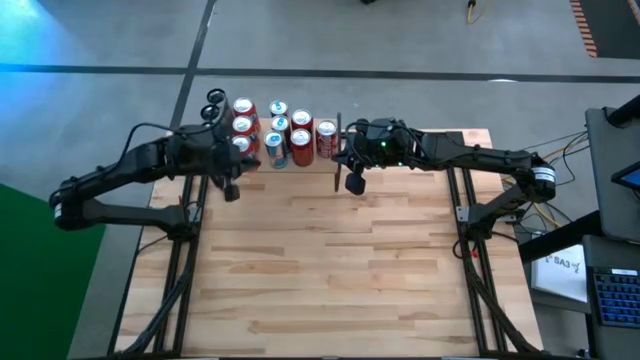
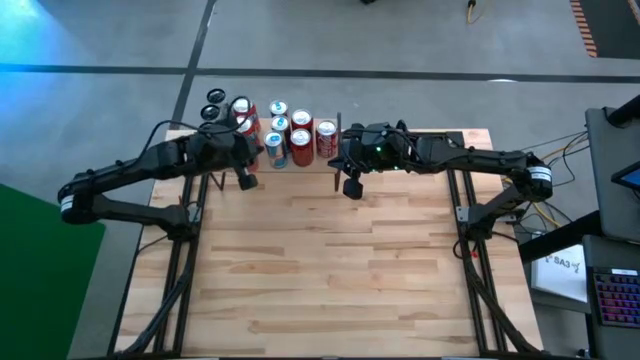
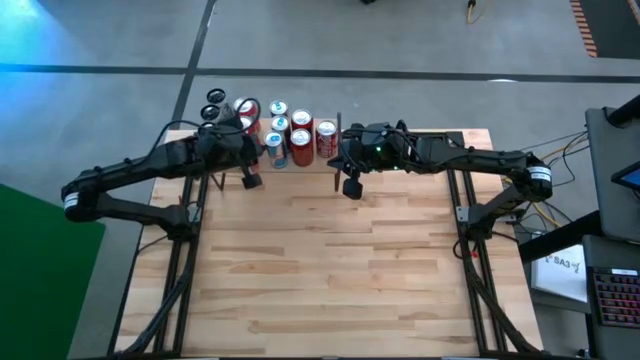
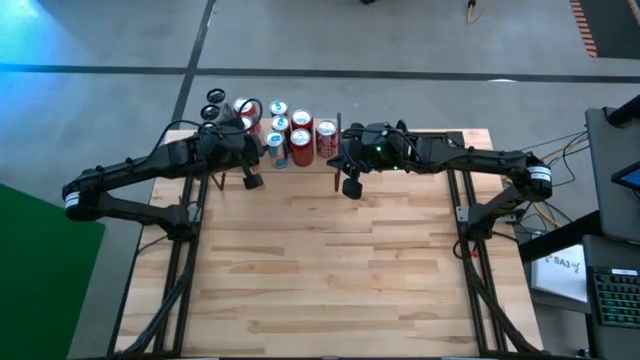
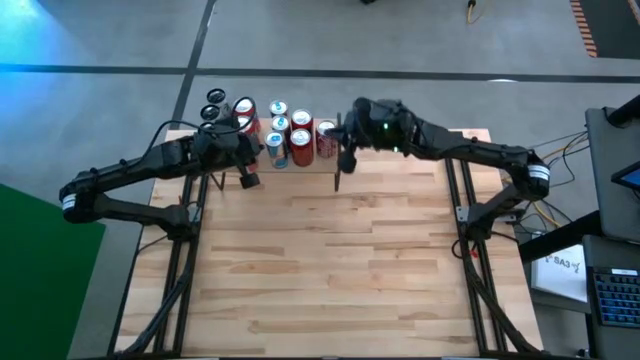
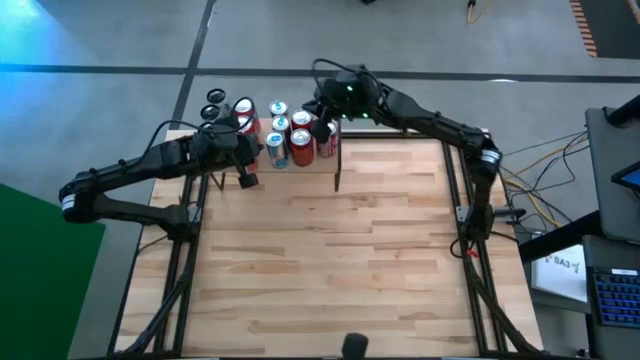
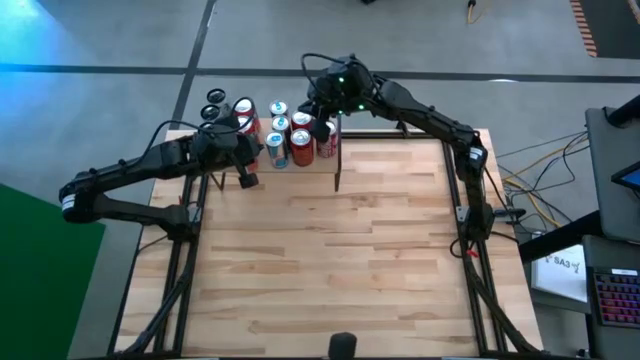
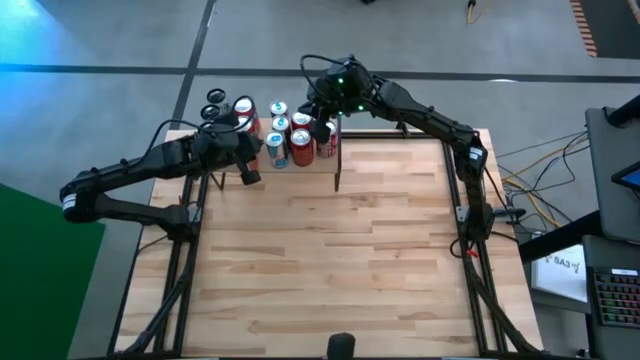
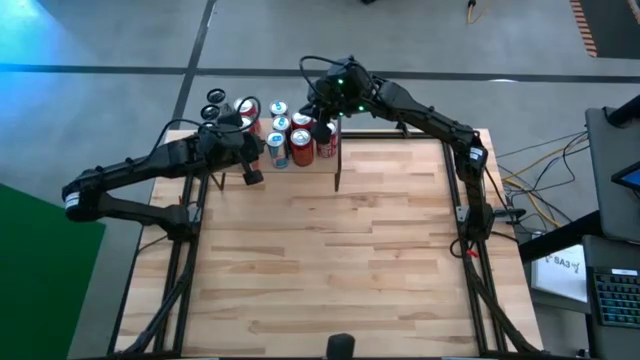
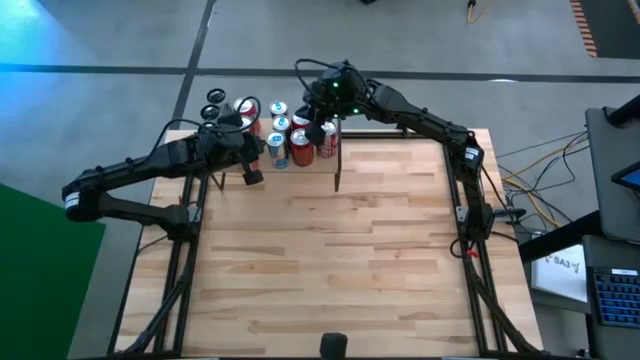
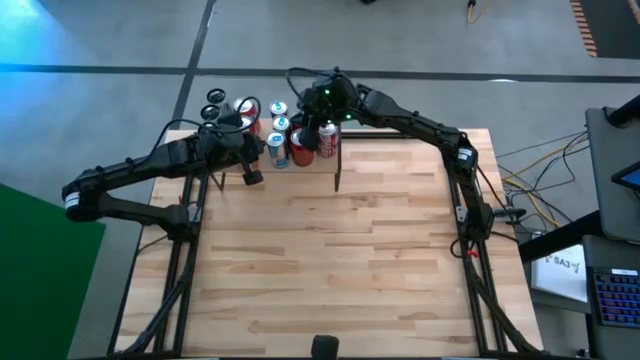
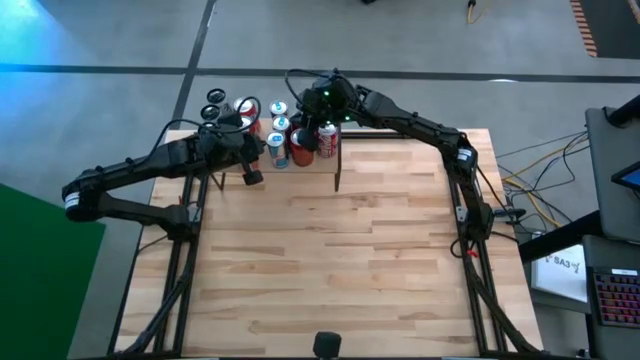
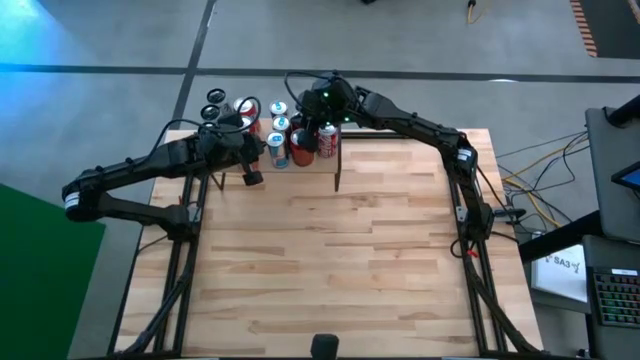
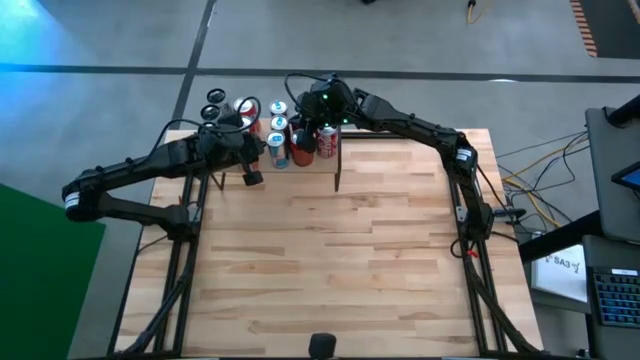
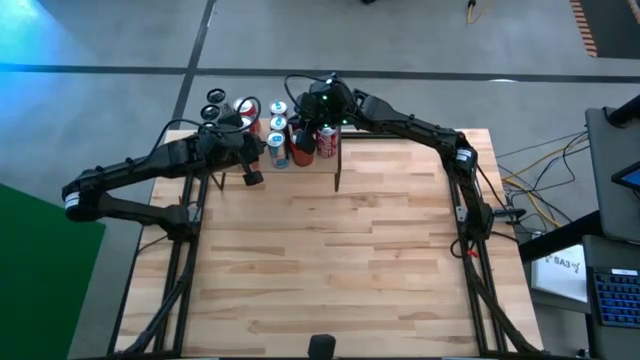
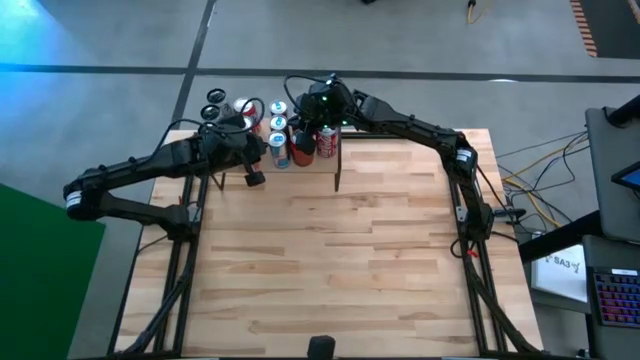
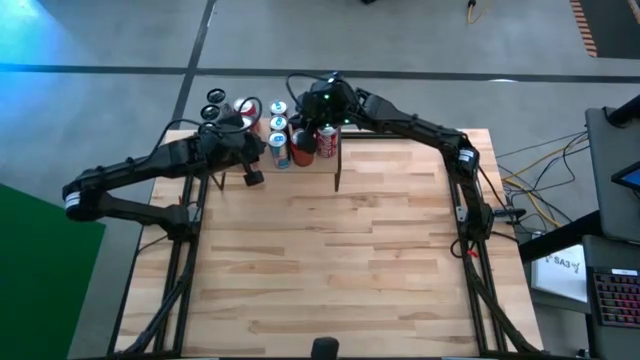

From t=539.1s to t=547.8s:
Task: Place canned beverage on shelf
Adjust the blue soda can on the shelf

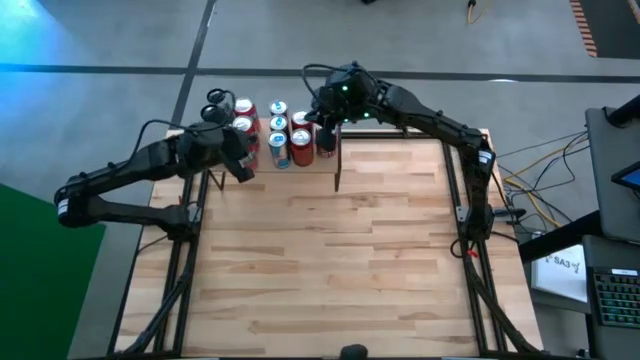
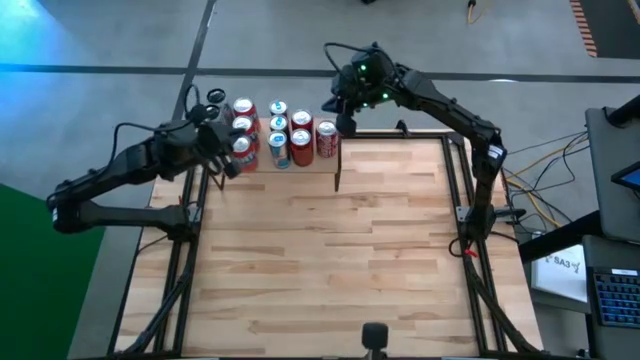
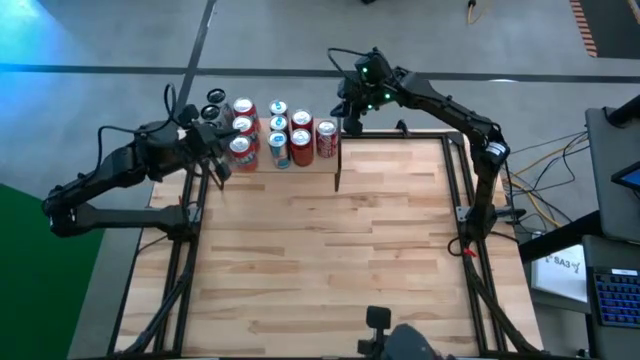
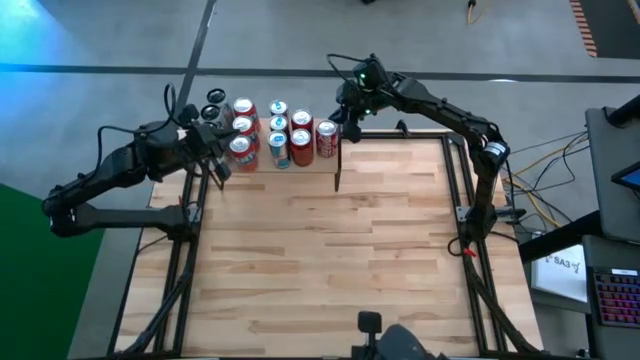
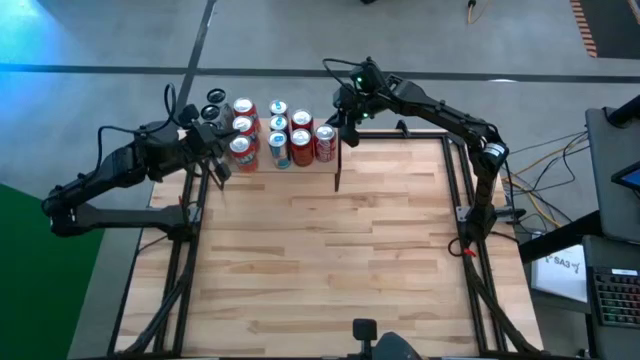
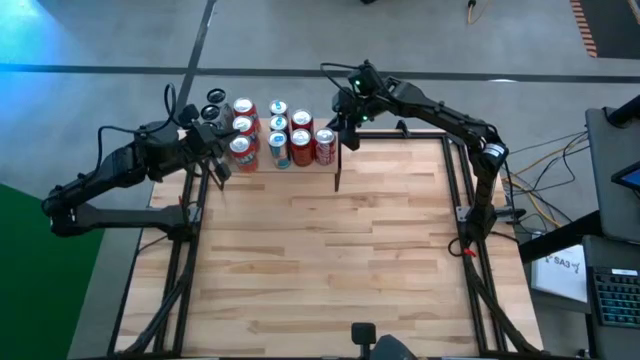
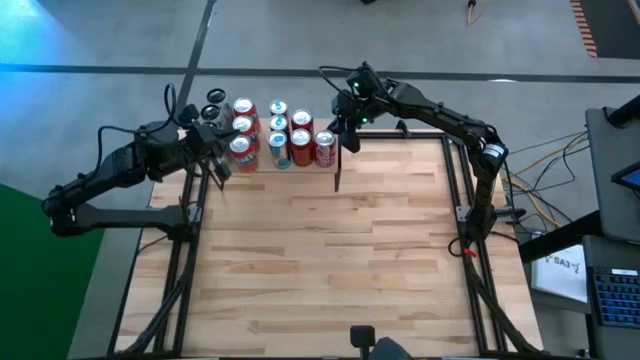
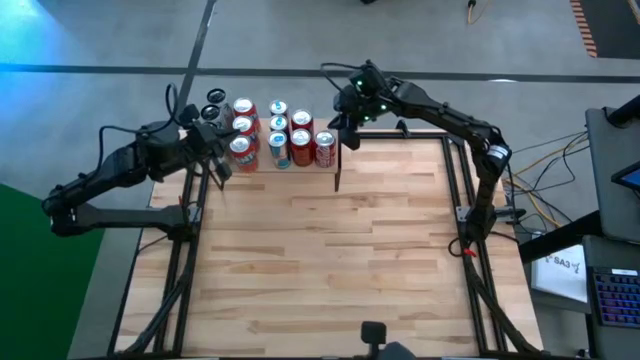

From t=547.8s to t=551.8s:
Adjust the red white soda can on the shelf

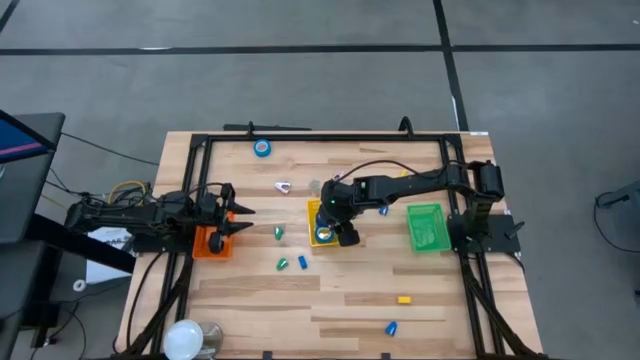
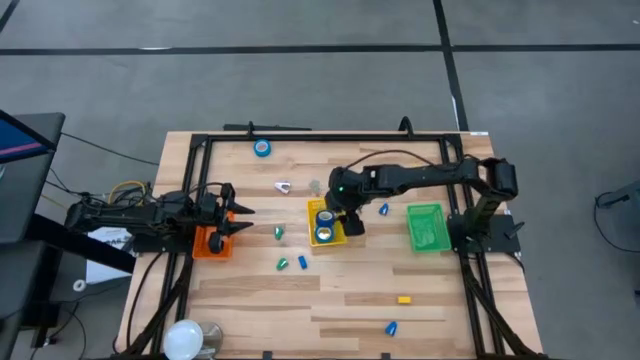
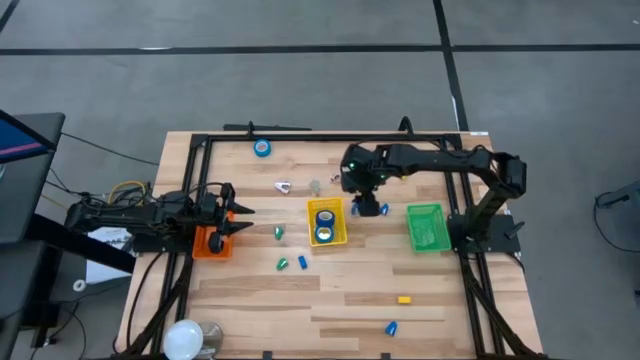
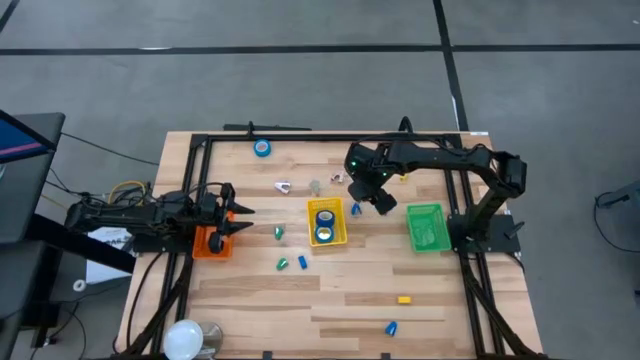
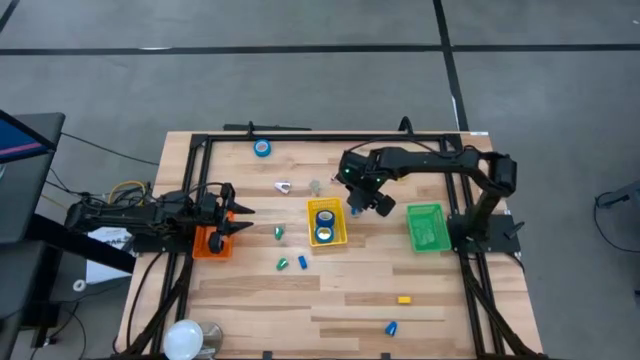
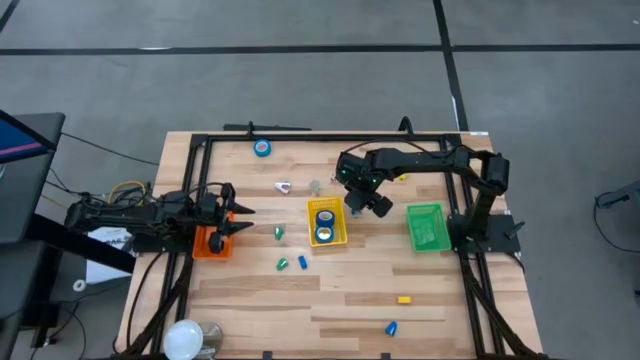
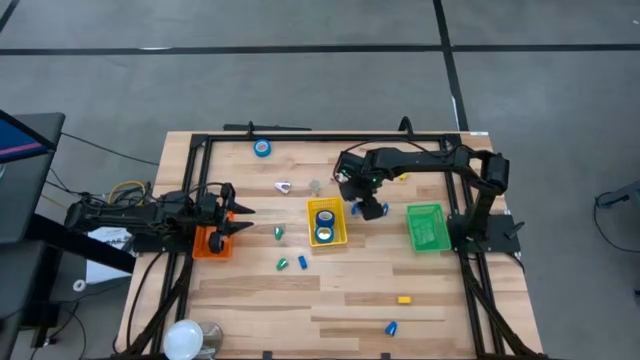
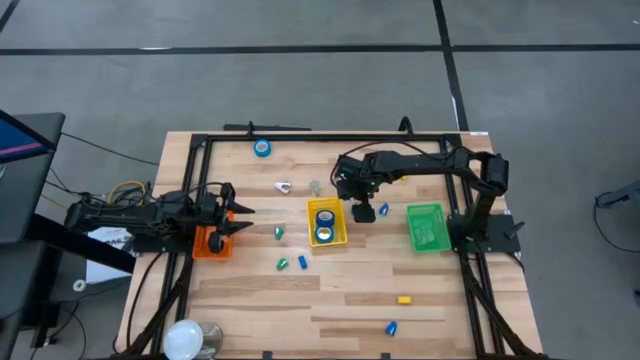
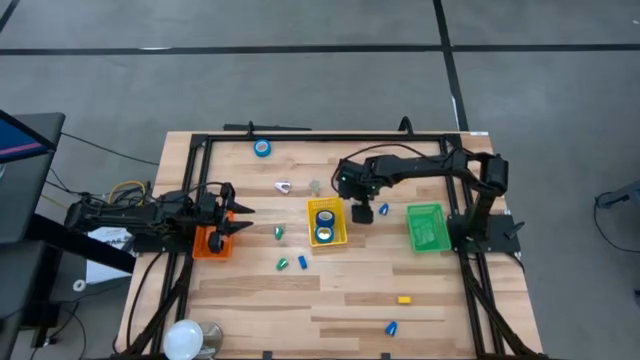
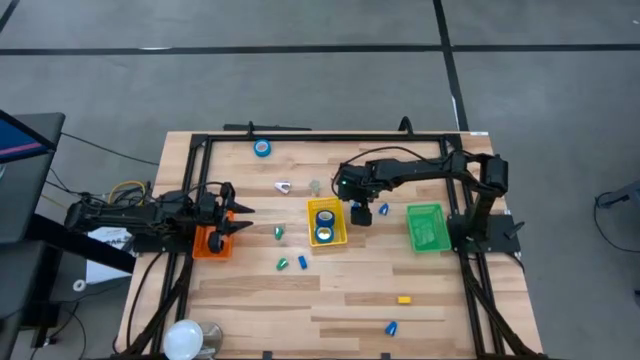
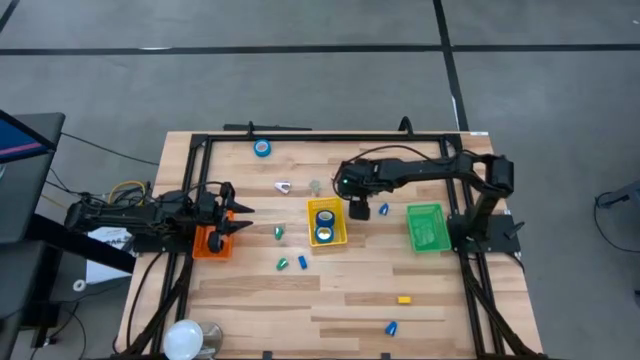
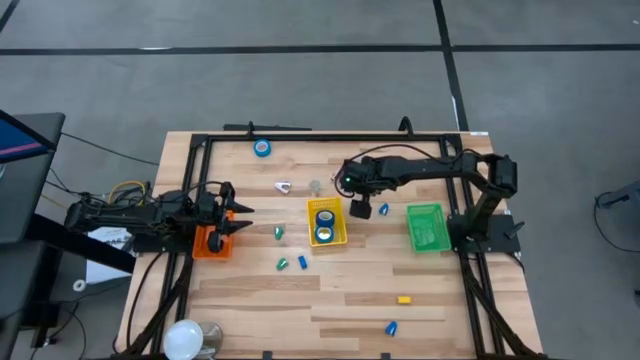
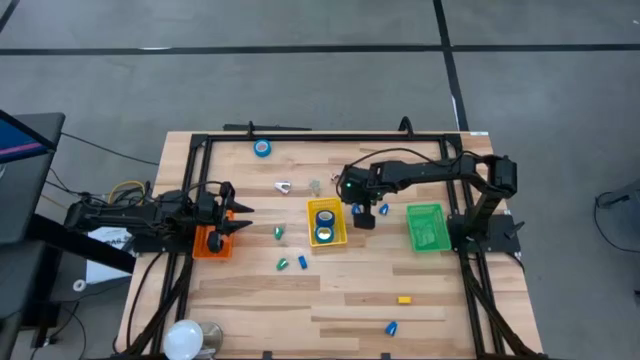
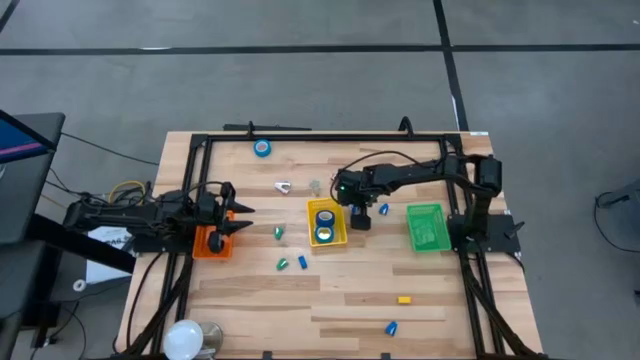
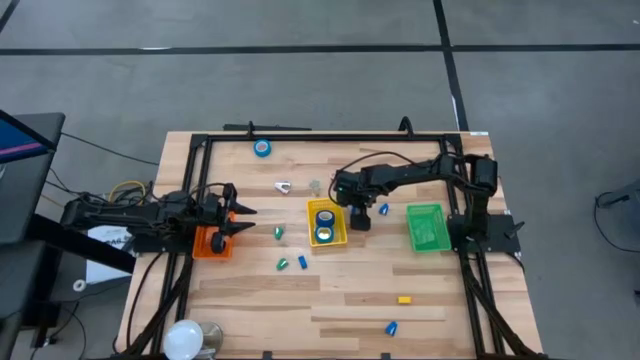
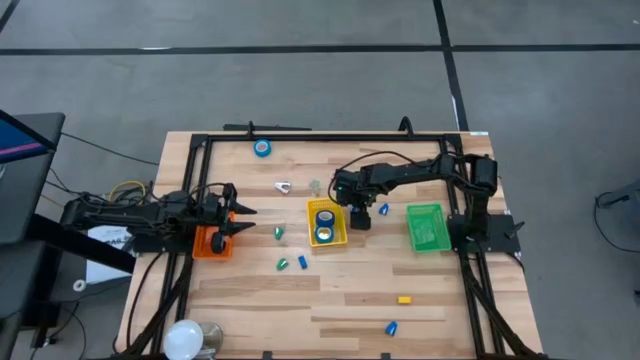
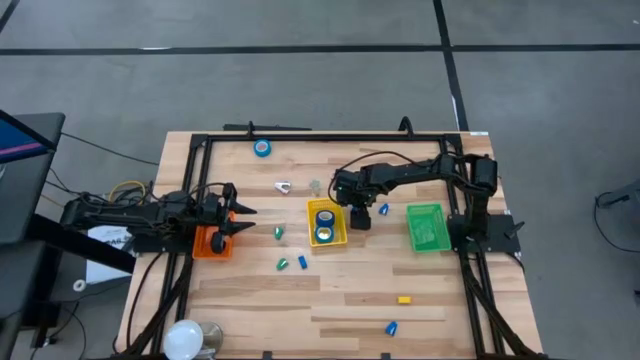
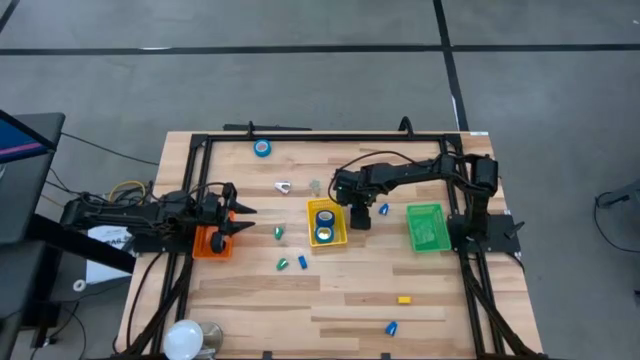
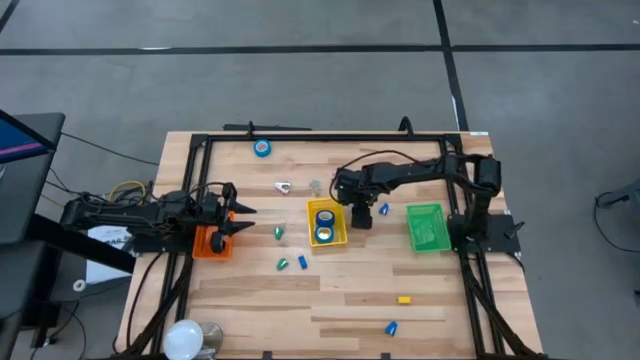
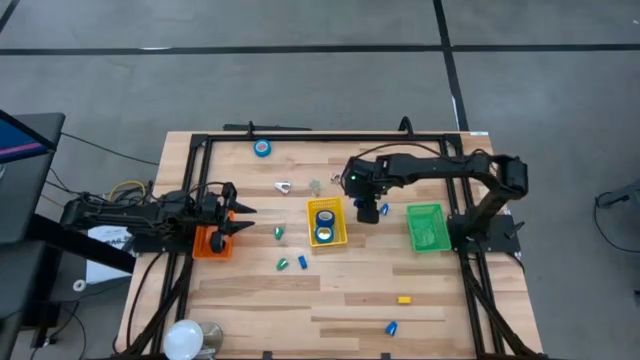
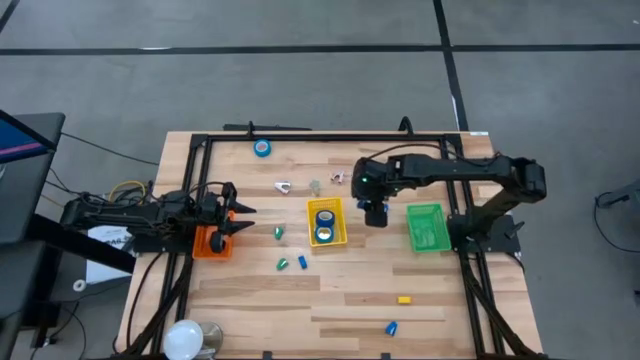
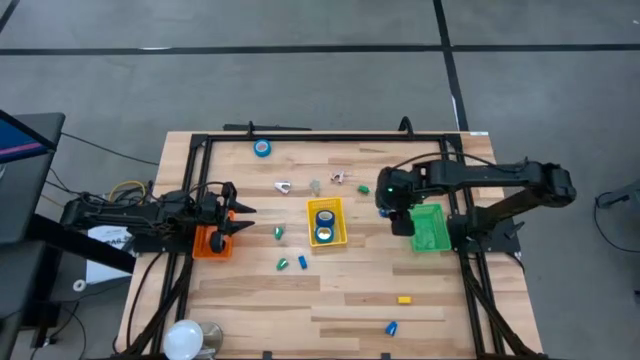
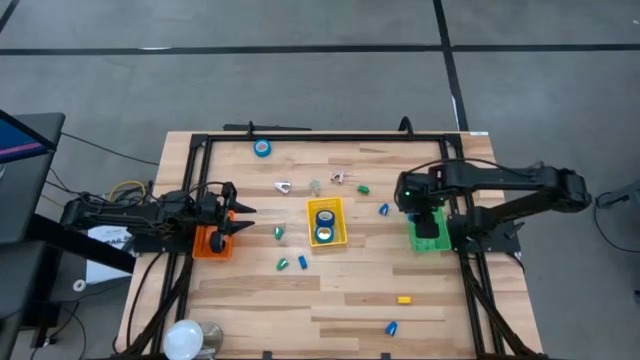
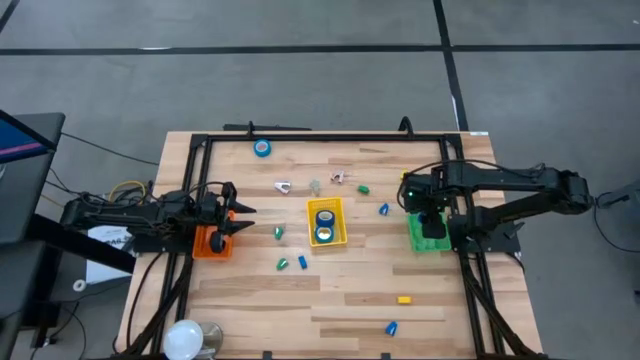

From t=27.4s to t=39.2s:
Task: Pick and place Stapler, Stapler remover, tape
Put the blue stapler into the green basket
